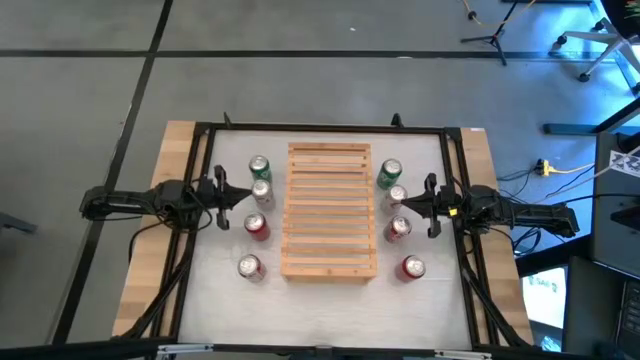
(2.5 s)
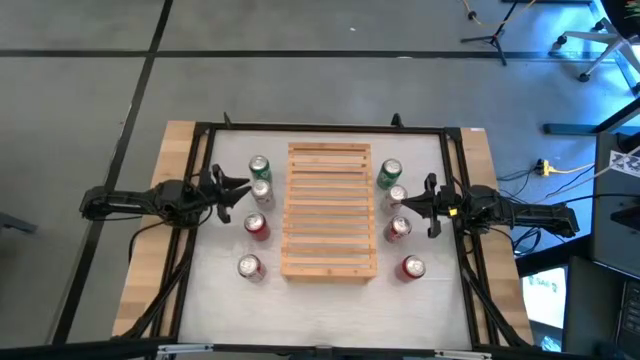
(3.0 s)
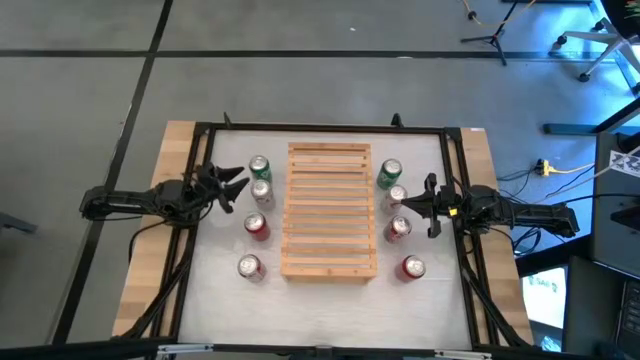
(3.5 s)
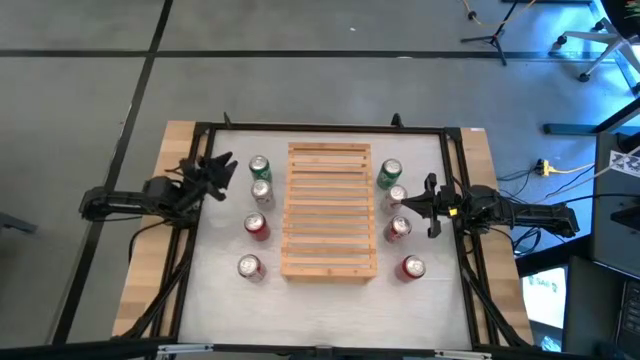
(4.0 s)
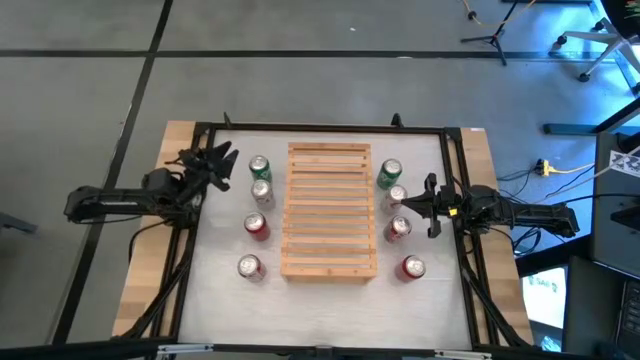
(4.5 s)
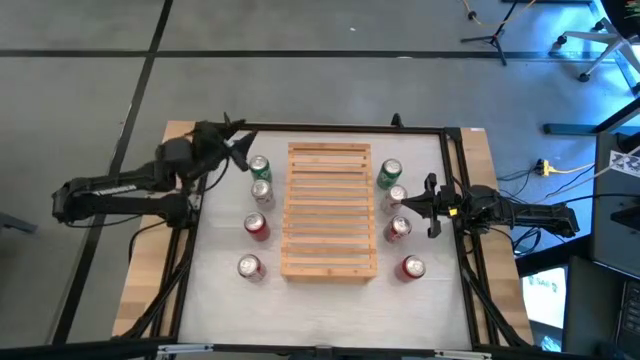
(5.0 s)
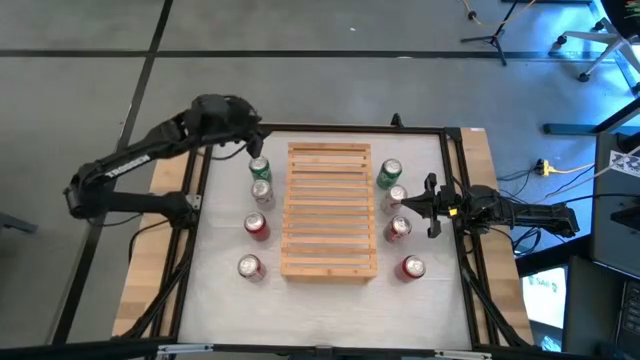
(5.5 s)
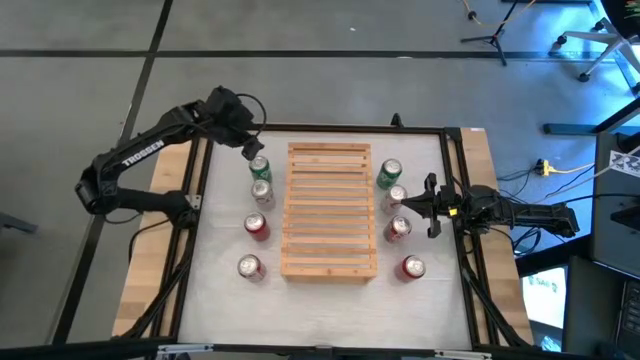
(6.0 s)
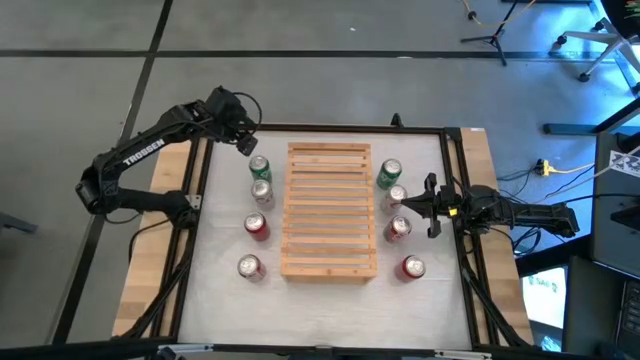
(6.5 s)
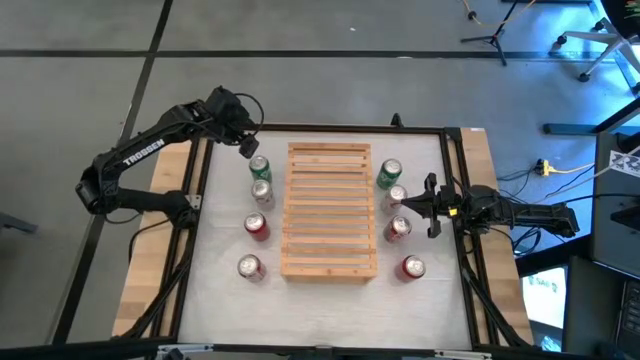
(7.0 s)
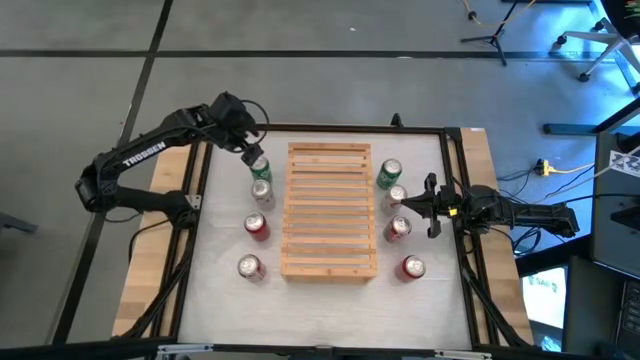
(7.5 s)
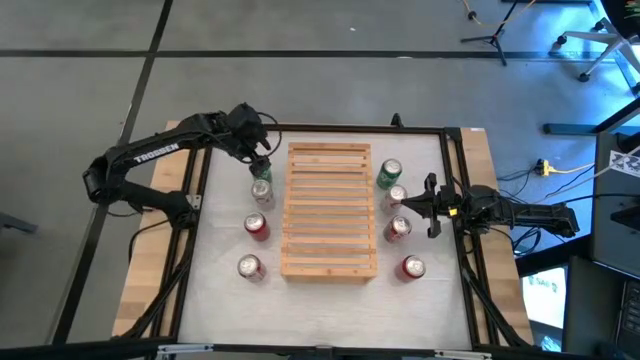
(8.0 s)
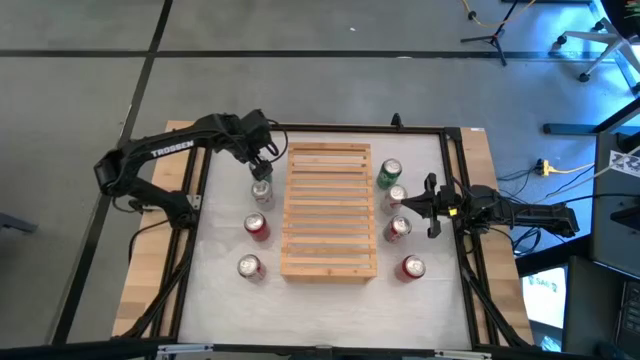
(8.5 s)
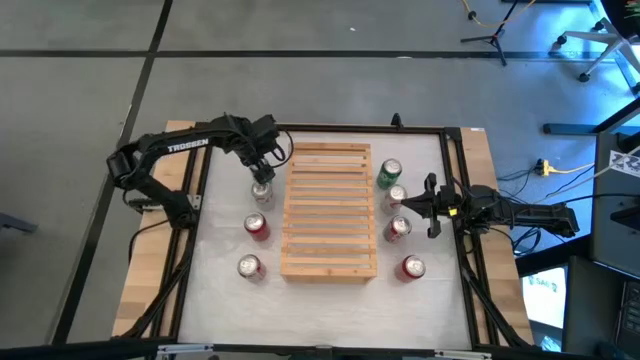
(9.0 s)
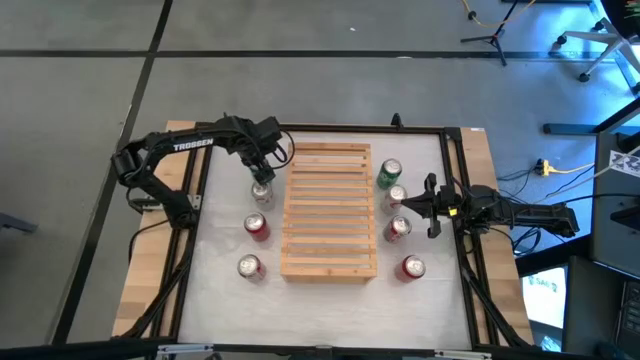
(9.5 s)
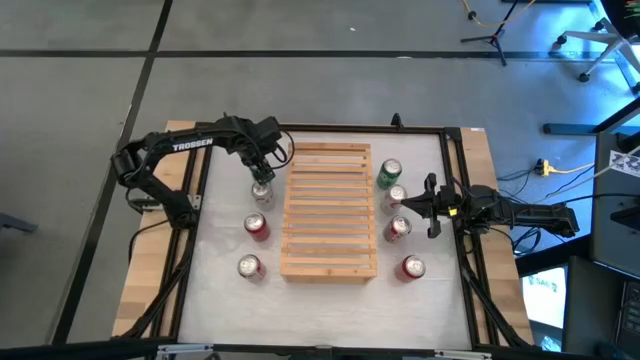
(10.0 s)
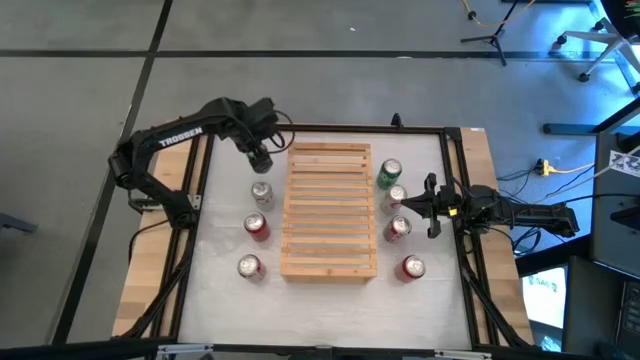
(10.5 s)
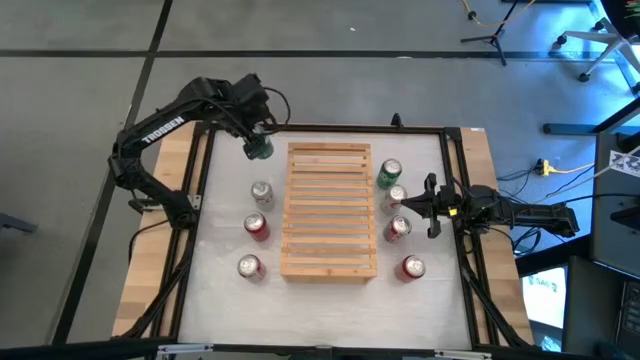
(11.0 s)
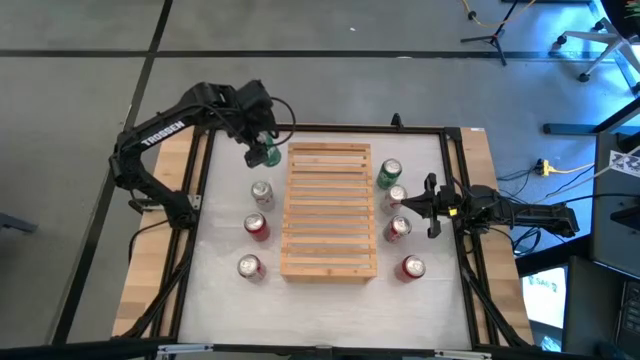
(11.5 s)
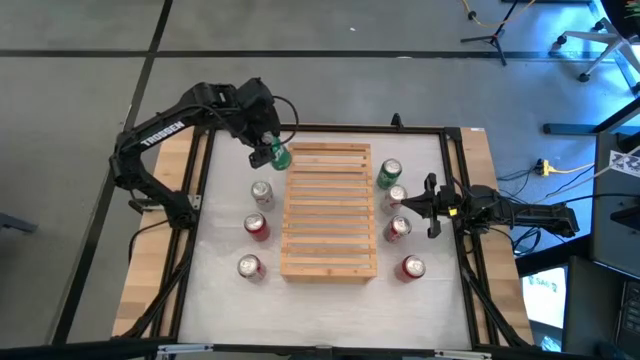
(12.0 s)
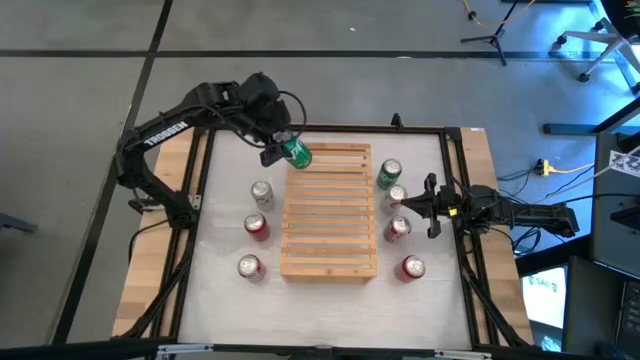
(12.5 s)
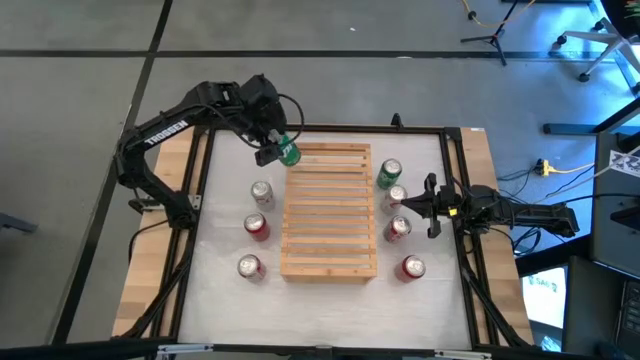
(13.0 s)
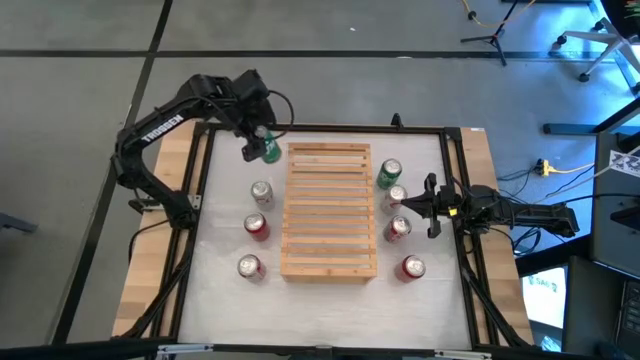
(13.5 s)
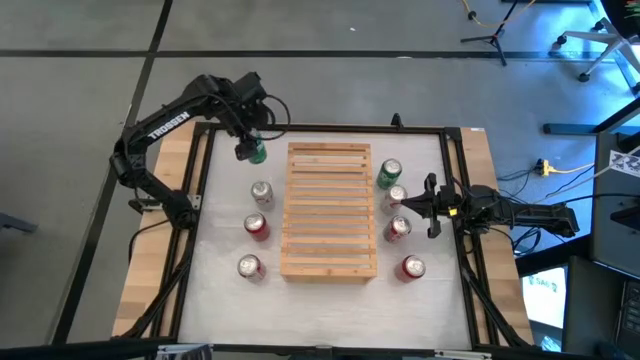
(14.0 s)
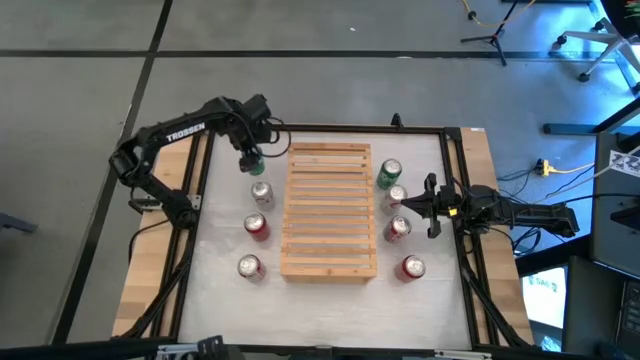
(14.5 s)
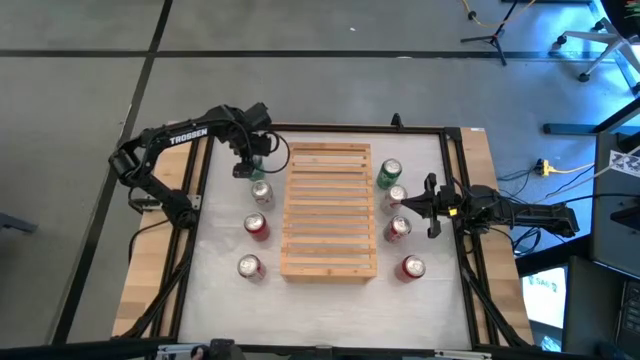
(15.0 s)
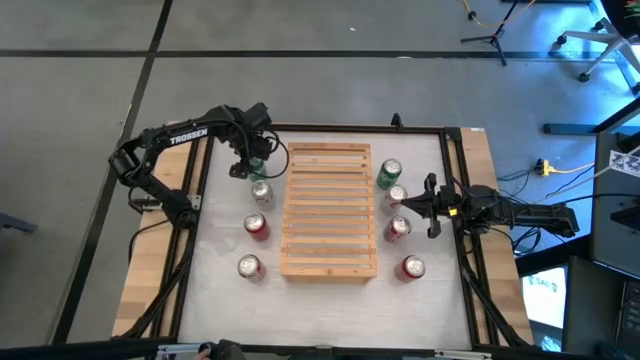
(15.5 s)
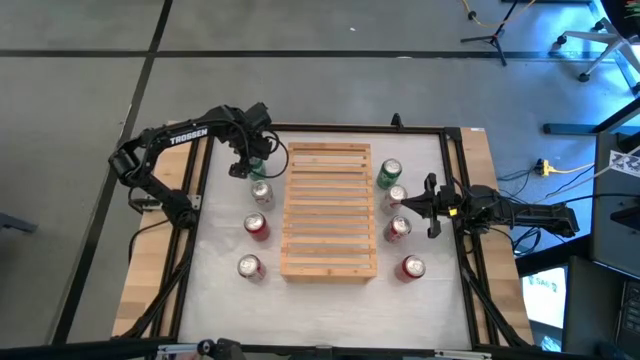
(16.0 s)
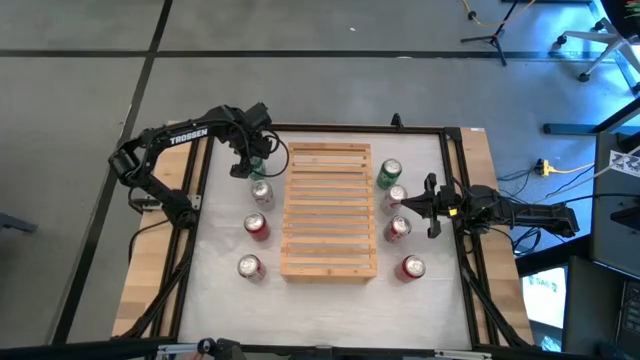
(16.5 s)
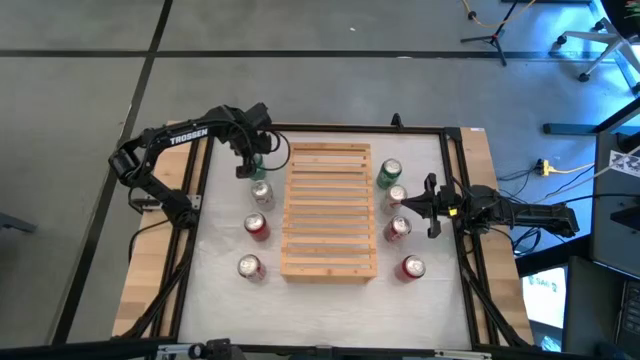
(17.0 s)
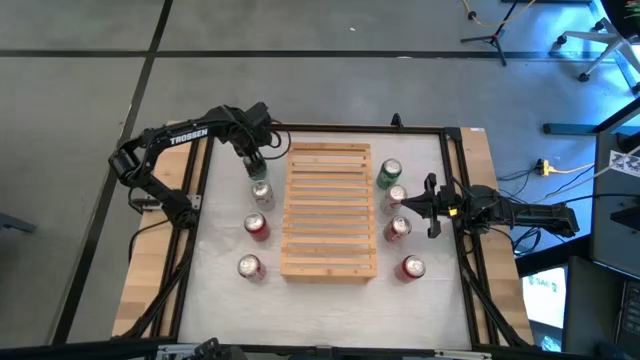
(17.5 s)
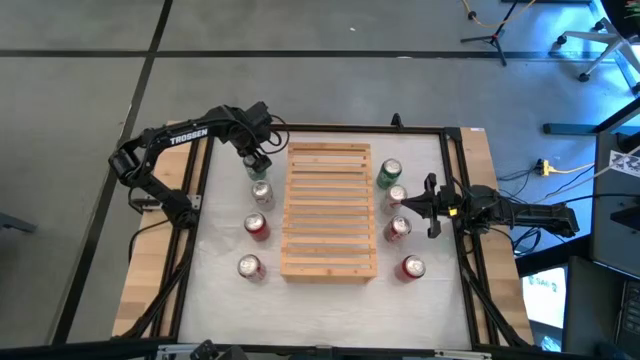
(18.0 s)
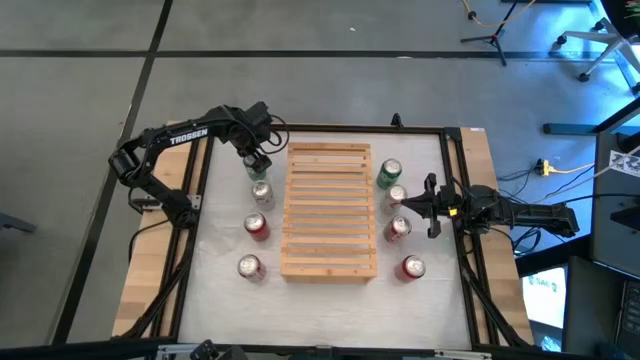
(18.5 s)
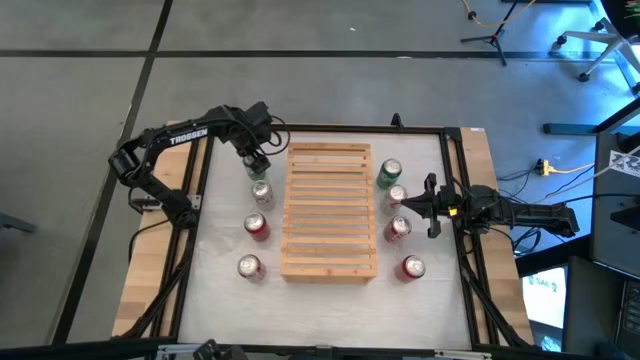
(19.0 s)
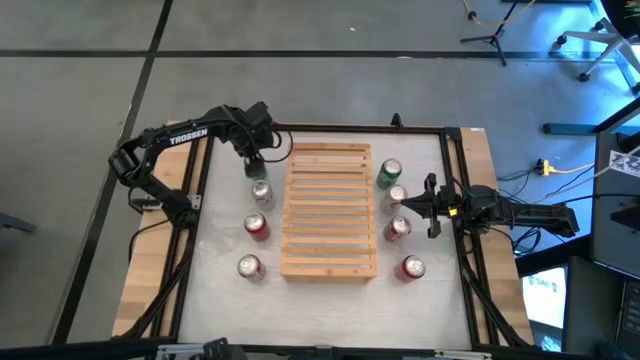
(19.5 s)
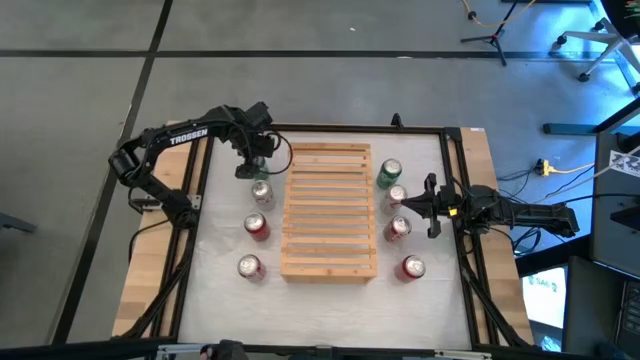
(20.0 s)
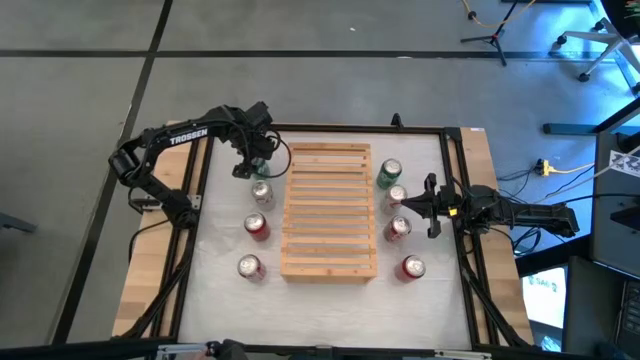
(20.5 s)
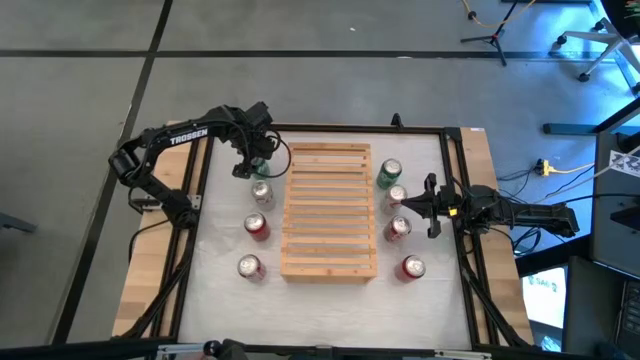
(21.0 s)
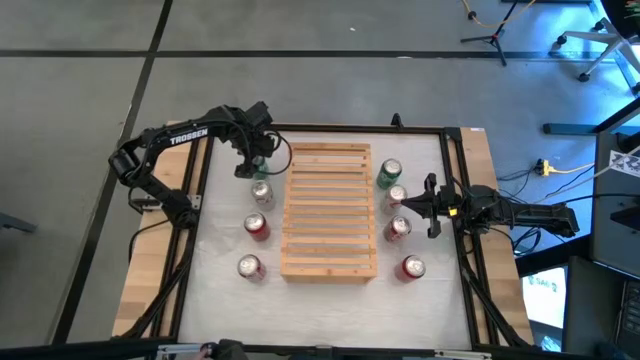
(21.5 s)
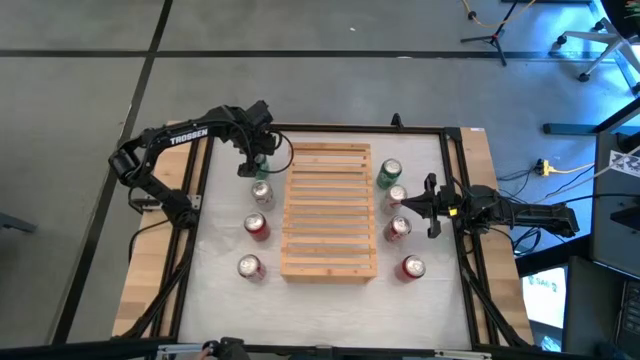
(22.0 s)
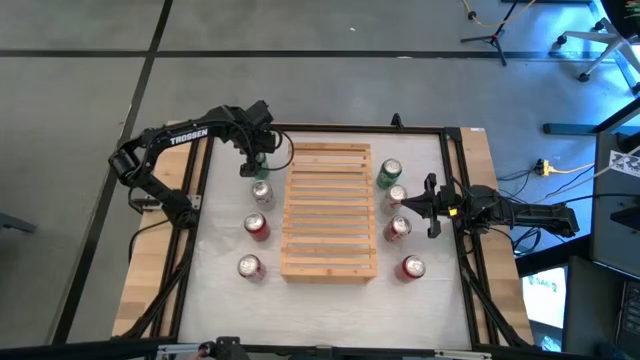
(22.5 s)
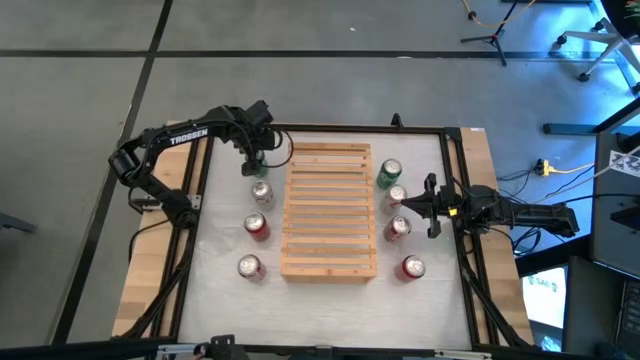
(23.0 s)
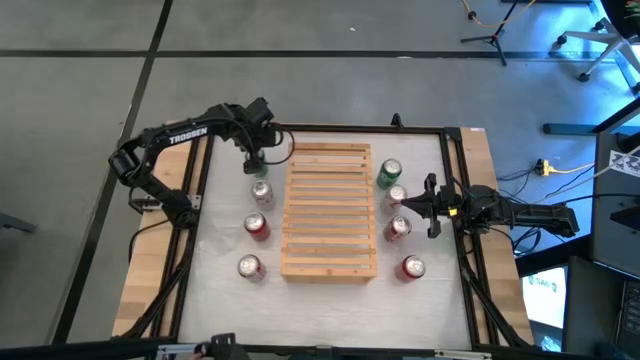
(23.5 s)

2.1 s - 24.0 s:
Task: Place canned beverage on shelf
Put the left green soda can on the shelf
